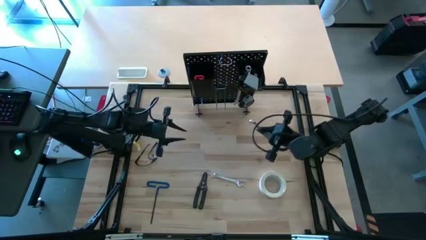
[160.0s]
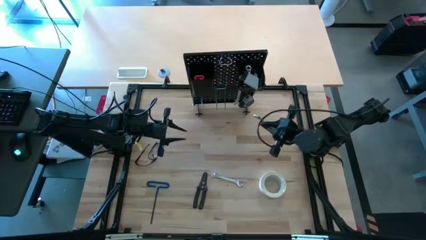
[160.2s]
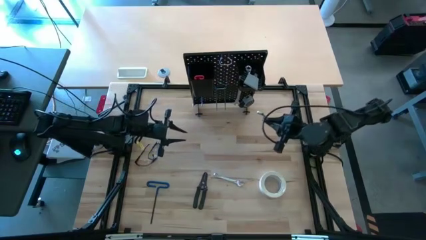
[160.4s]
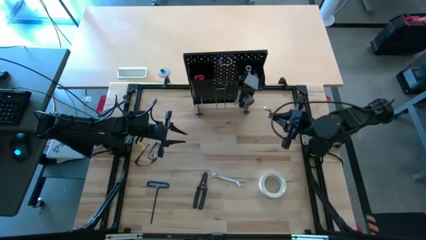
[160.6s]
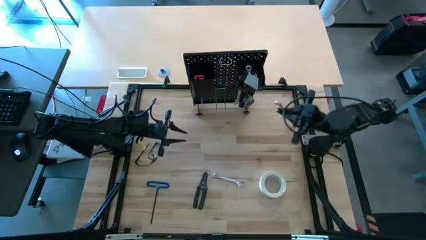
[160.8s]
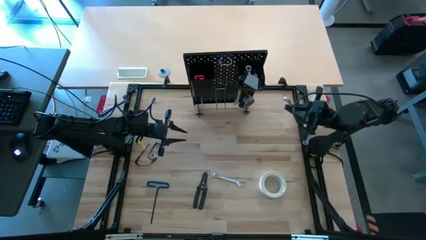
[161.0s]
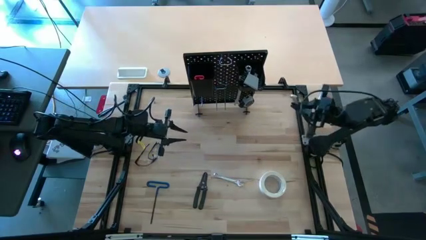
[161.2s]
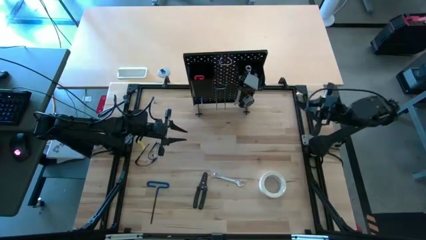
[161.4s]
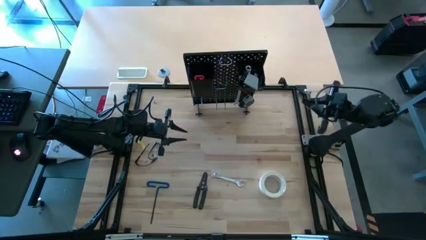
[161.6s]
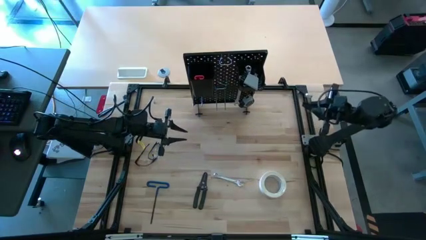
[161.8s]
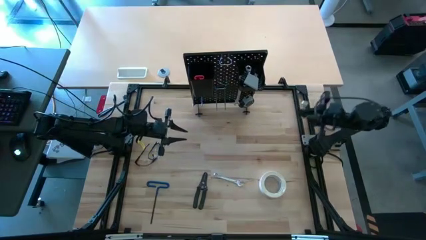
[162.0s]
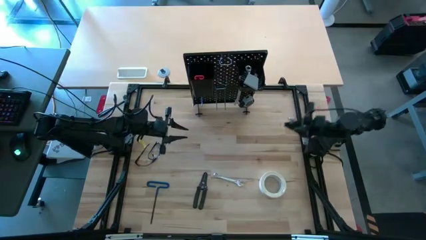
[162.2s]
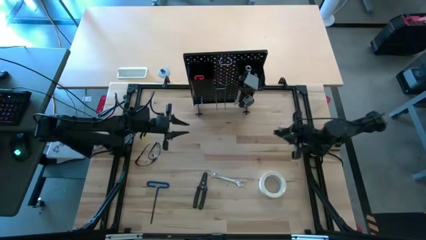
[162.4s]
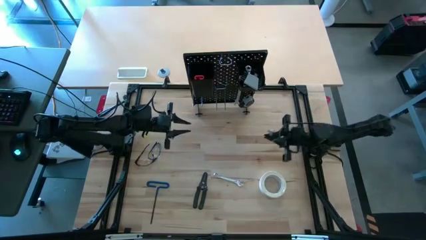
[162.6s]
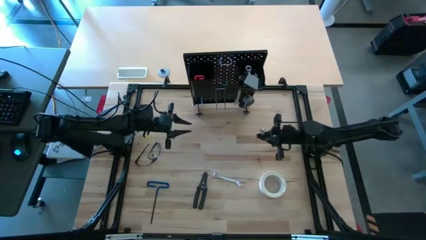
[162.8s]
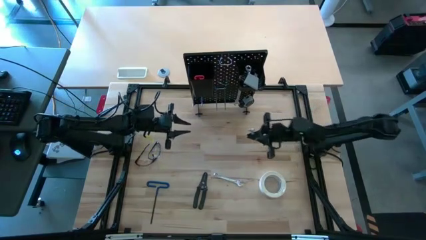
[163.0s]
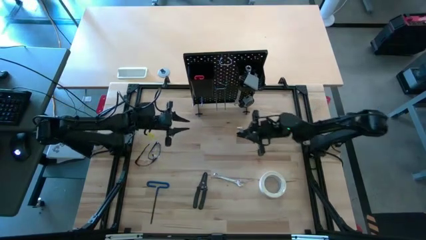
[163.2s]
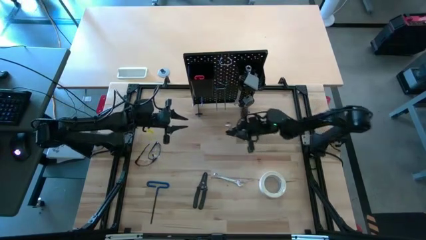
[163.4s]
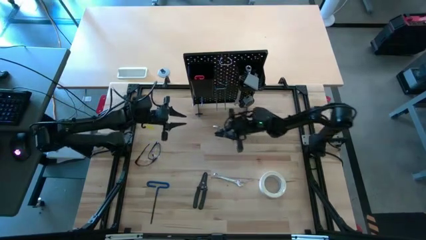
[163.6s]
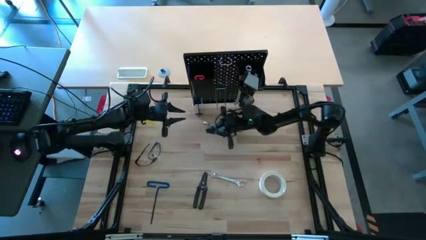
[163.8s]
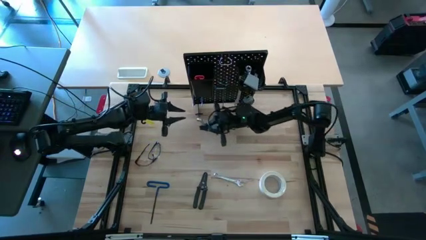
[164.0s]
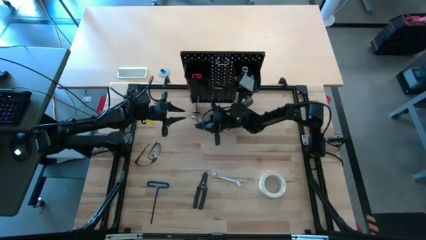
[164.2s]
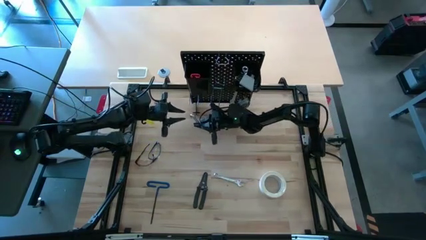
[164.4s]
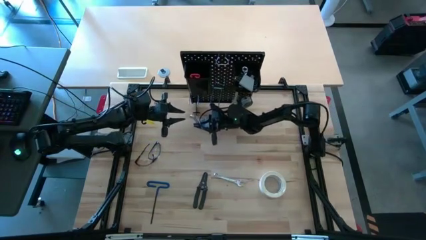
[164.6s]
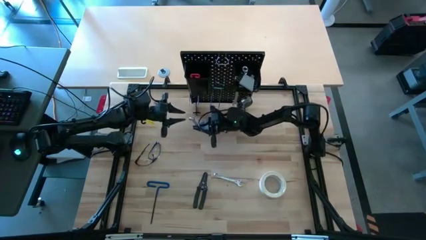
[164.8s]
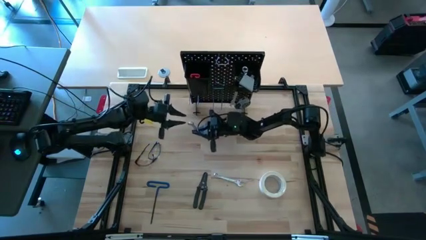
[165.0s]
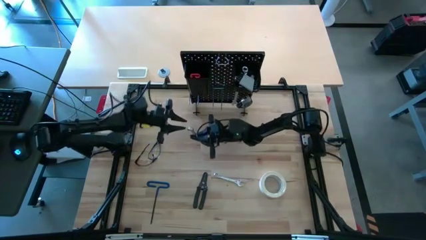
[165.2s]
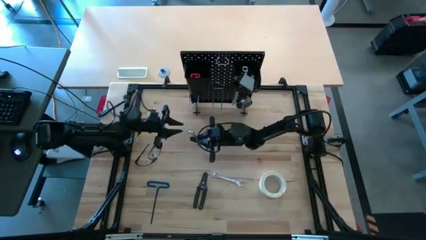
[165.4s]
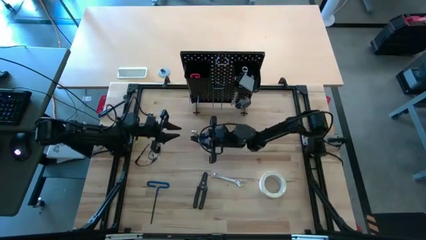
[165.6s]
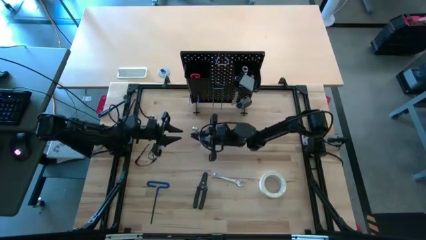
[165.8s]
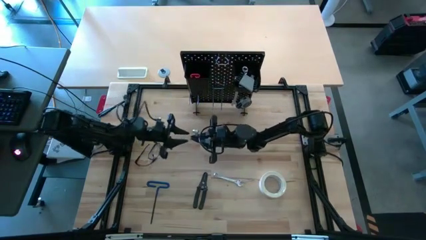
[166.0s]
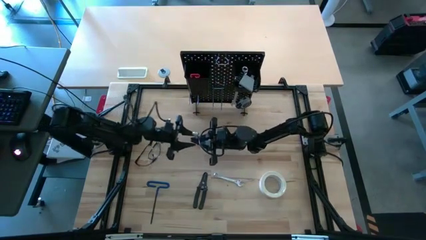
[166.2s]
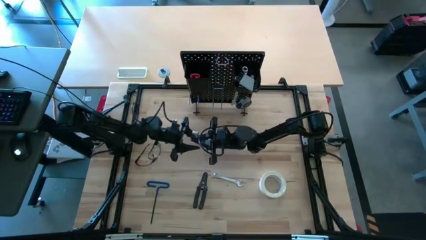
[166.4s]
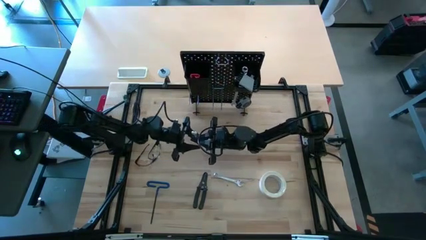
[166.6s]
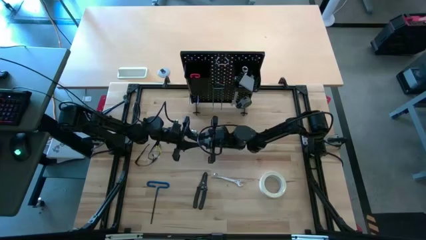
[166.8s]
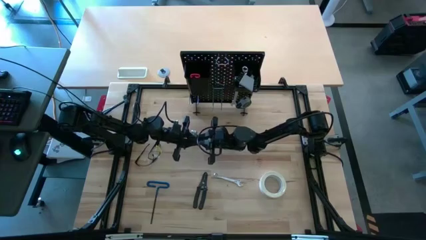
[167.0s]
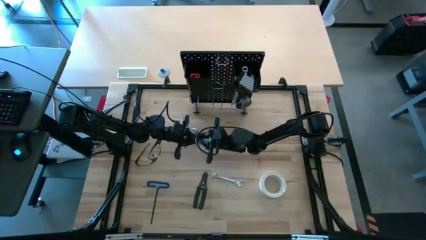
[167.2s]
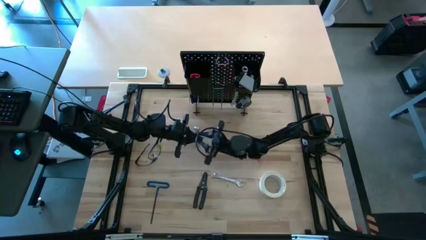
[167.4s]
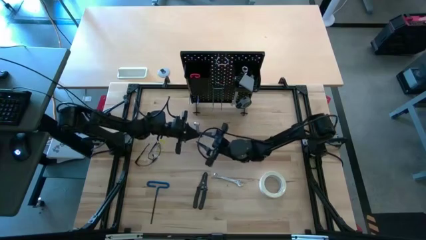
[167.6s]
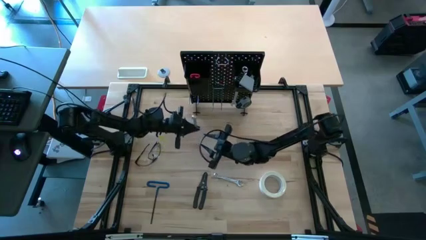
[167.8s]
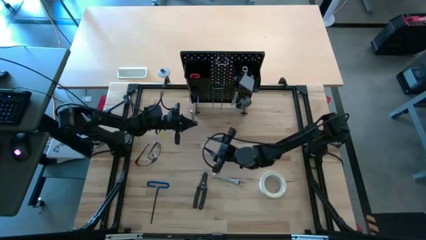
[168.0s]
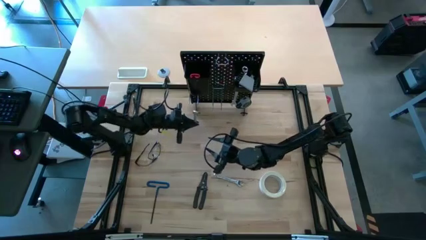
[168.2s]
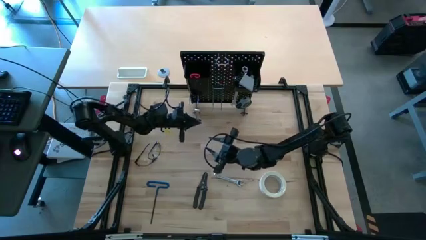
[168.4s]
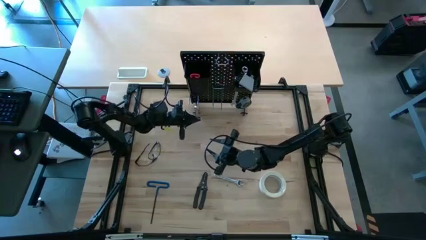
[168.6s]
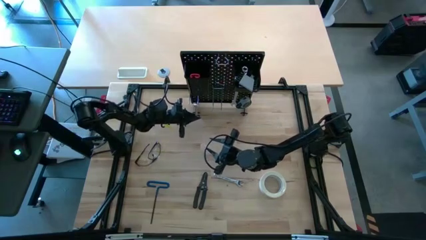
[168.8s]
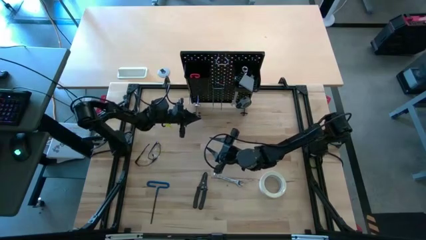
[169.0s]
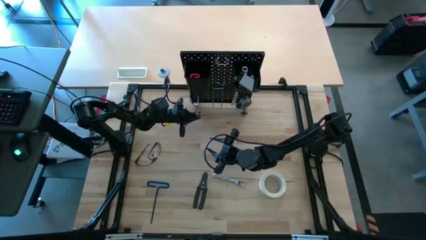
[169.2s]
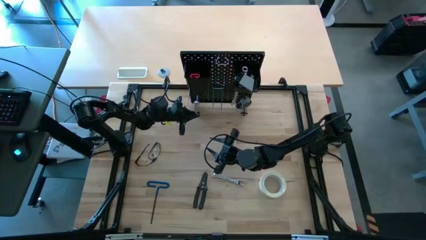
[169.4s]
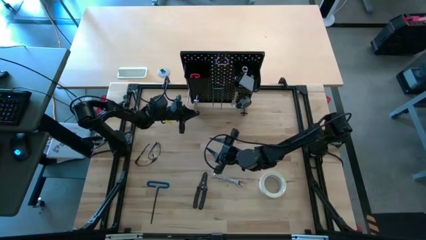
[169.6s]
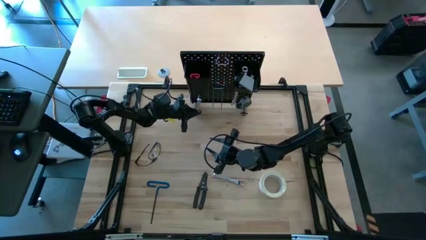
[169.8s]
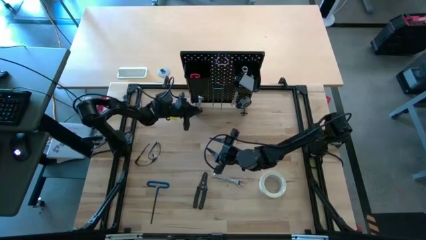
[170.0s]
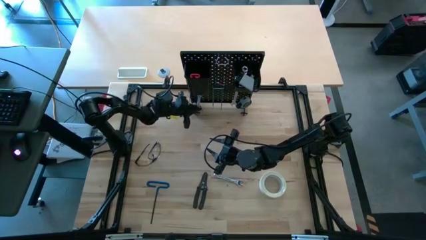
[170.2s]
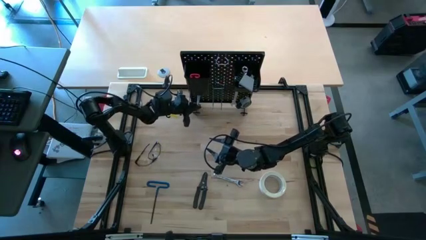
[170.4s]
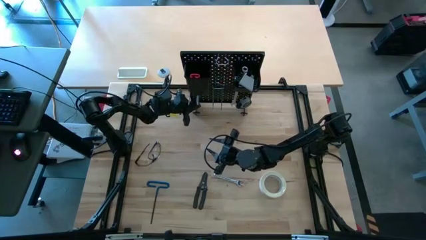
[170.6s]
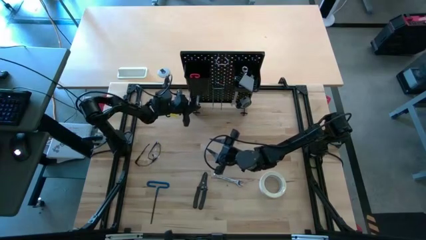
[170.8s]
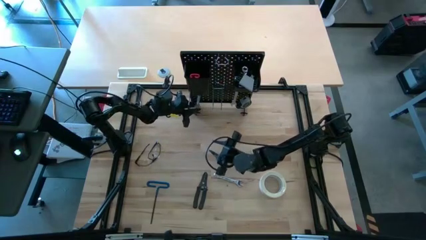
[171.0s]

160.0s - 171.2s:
Task: Hang tools onto peg board
Hang the top silver wrench on the pegboard

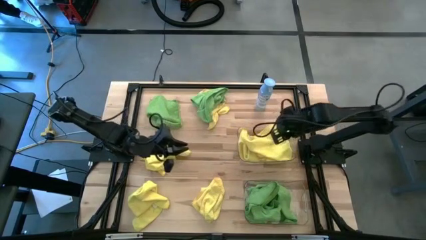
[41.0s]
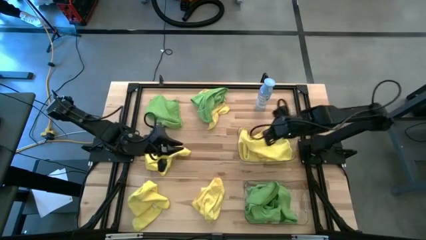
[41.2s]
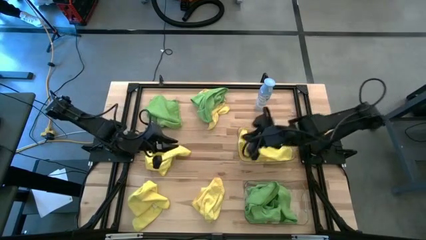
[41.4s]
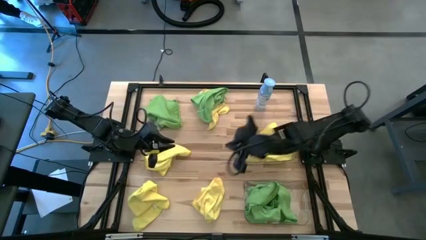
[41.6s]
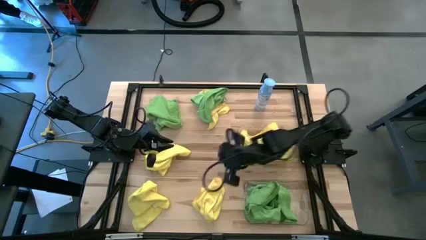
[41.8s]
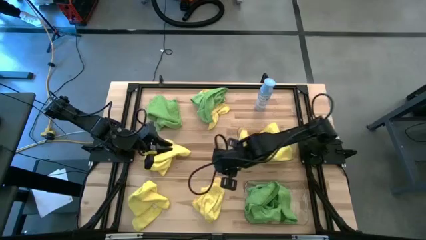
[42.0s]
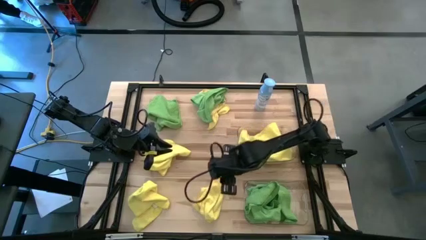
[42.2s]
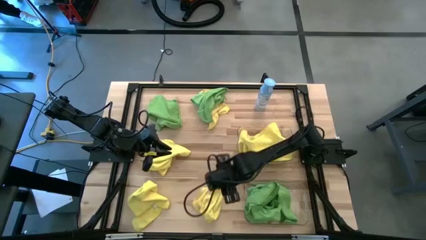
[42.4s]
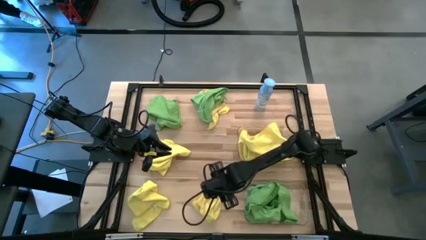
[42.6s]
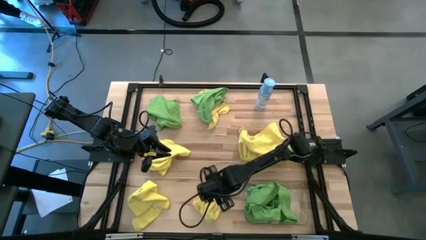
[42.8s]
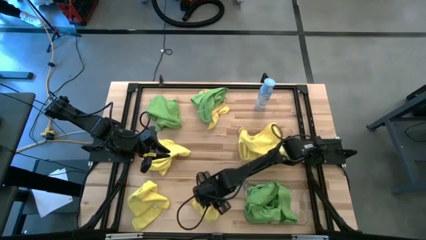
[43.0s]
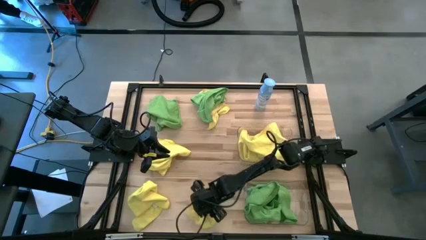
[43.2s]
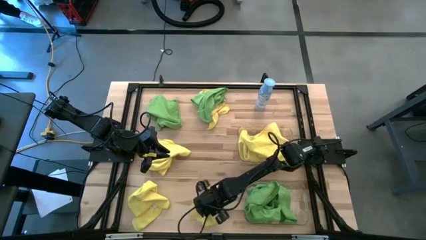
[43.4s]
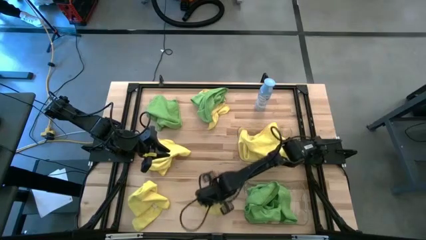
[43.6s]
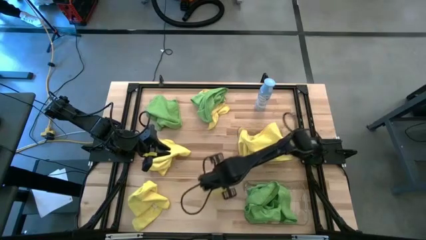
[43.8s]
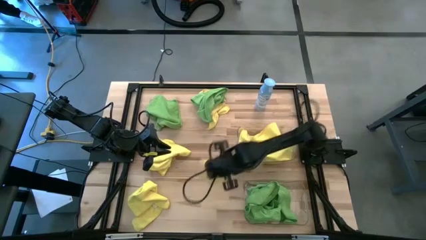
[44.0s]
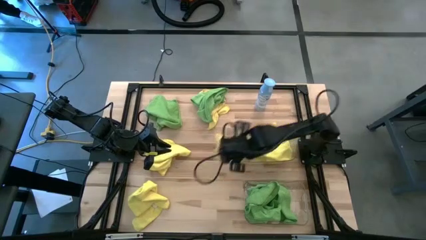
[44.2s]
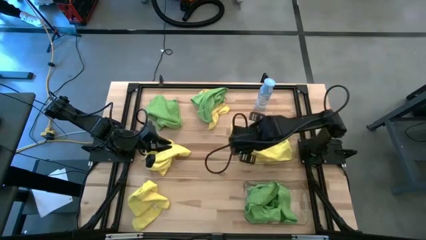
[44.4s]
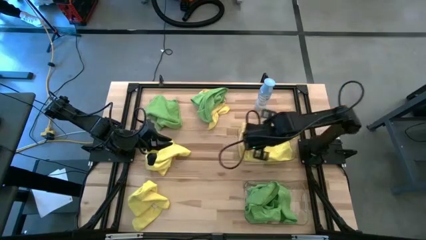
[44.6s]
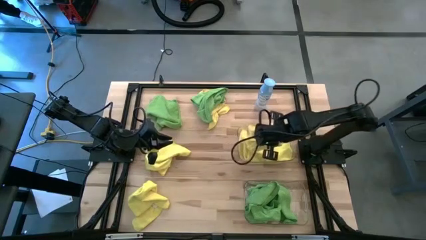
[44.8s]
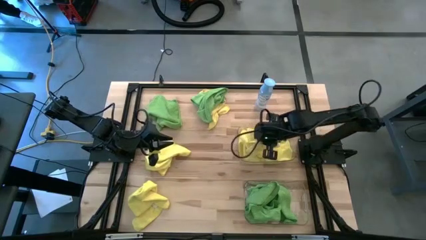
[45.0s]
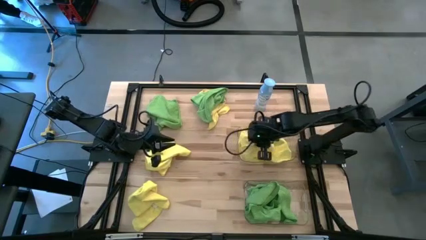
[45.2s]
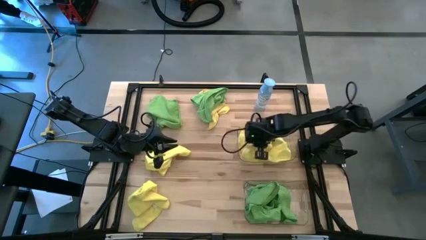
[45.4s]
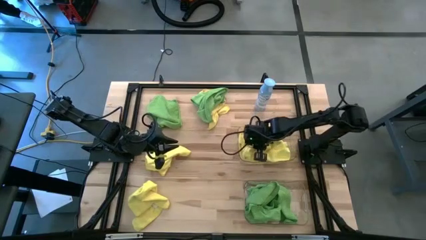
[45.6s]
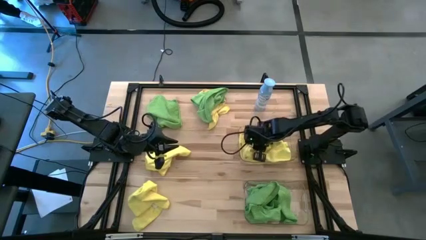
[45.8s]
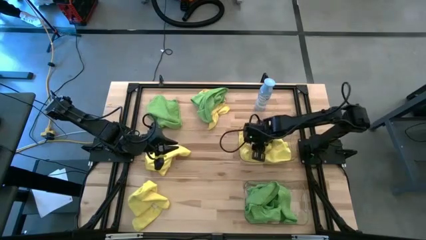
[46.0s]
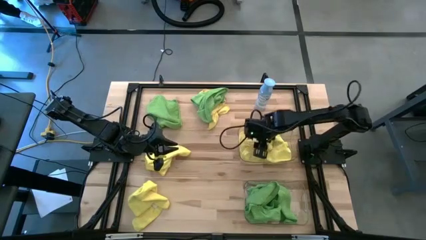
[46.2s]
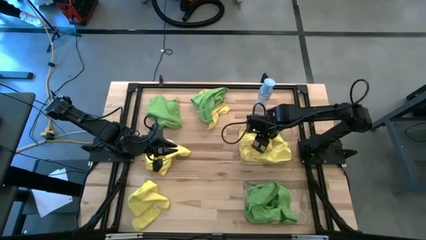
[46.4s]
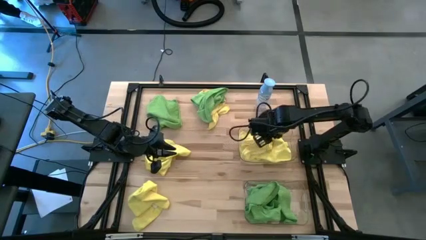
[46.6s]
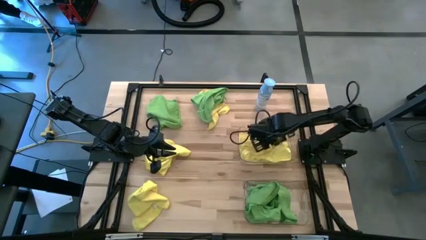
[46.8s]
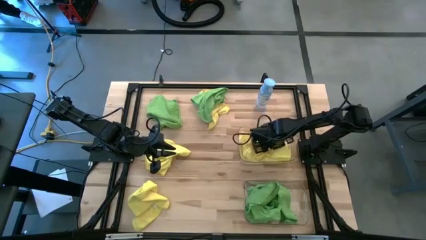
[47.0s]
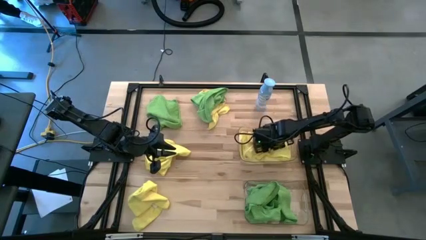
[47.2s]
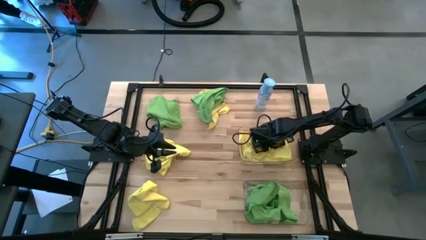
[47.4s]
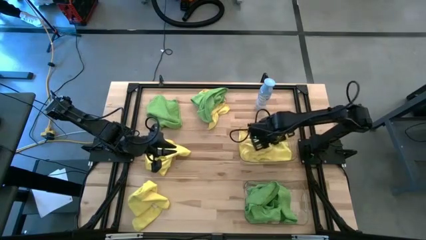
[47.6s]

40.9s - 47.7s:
Task: Sort microfiber towel by color & place in baskets
Put the yellow microfiber towel into the top transparent bin
